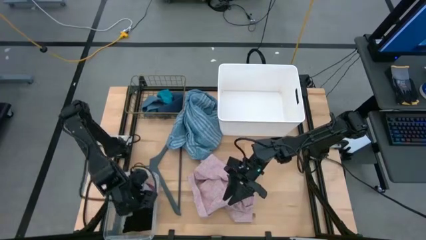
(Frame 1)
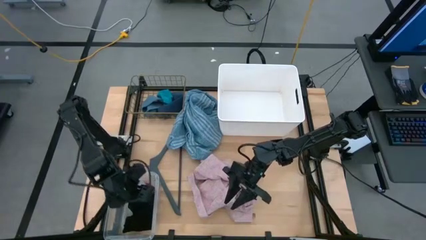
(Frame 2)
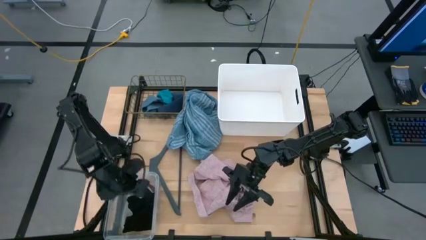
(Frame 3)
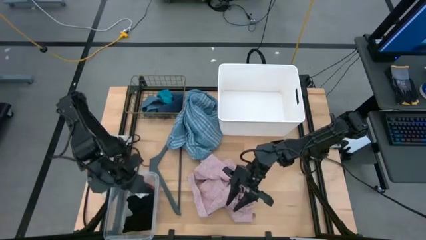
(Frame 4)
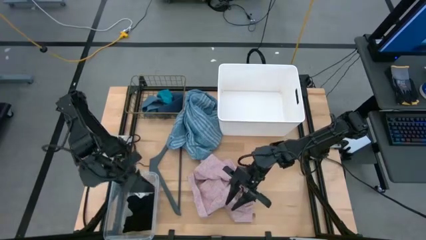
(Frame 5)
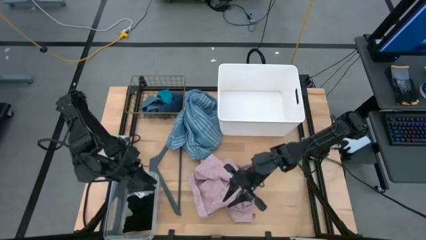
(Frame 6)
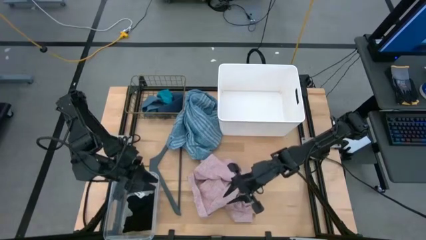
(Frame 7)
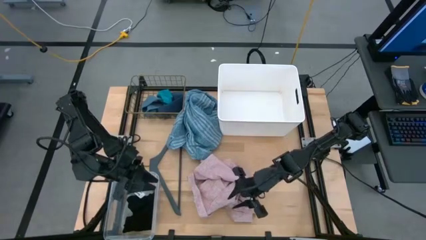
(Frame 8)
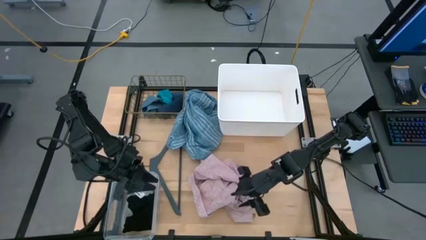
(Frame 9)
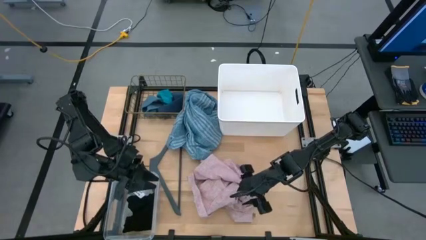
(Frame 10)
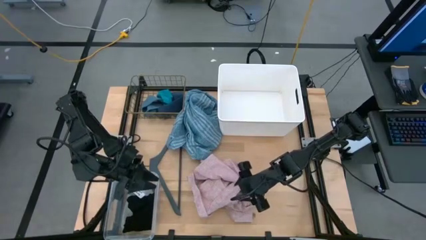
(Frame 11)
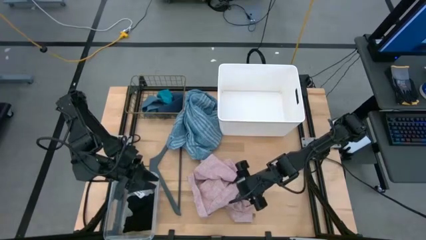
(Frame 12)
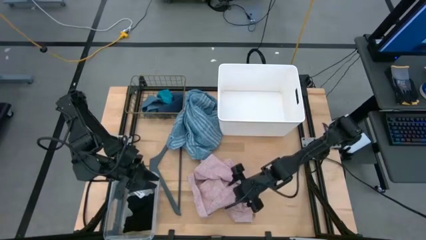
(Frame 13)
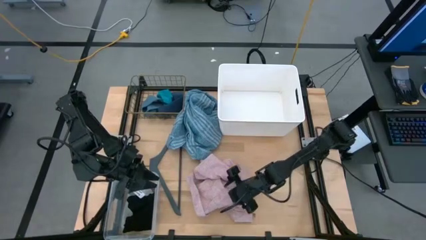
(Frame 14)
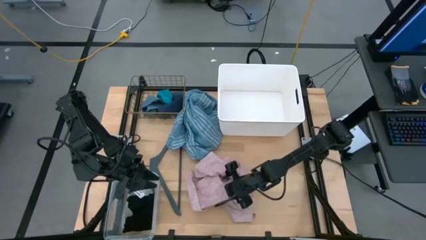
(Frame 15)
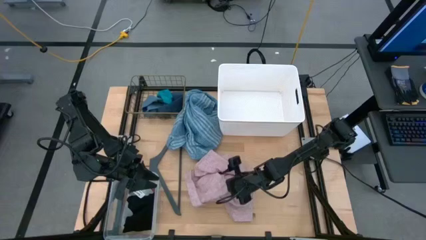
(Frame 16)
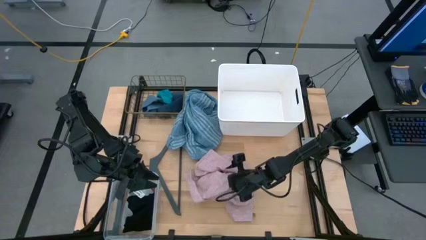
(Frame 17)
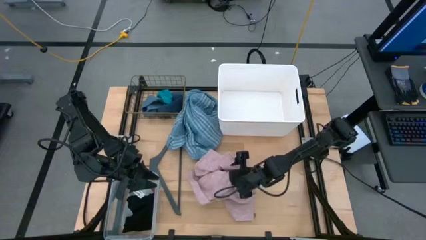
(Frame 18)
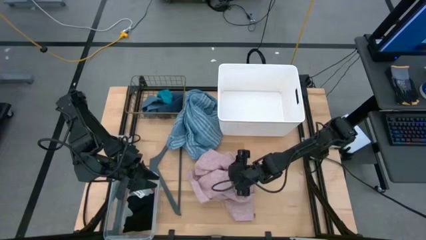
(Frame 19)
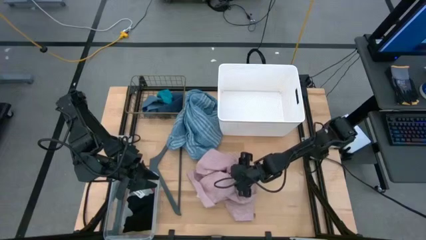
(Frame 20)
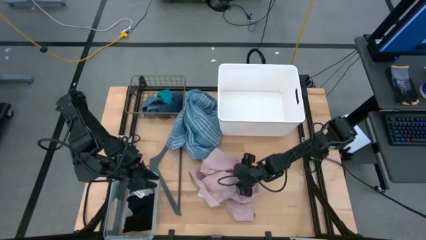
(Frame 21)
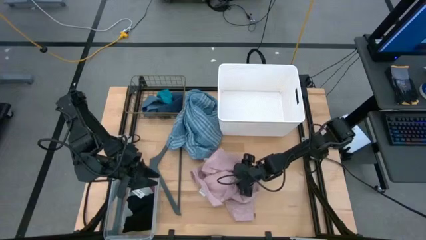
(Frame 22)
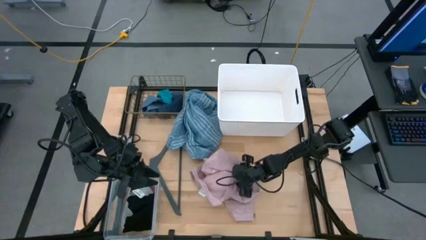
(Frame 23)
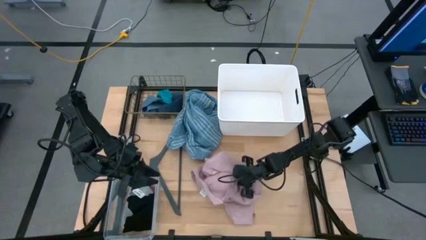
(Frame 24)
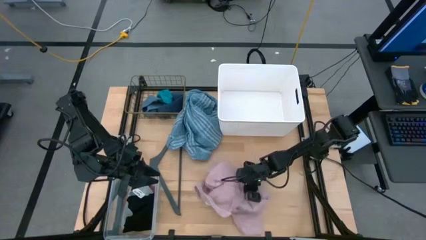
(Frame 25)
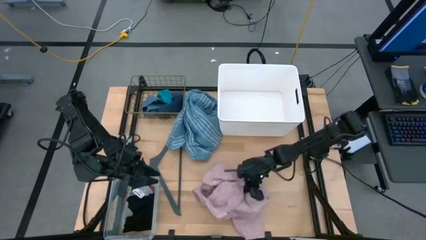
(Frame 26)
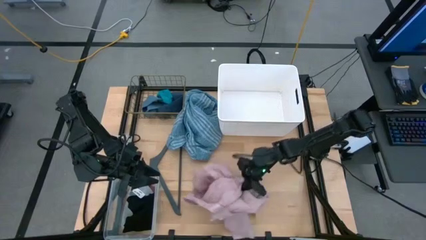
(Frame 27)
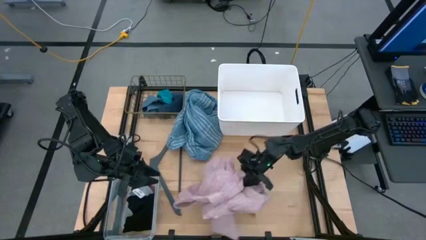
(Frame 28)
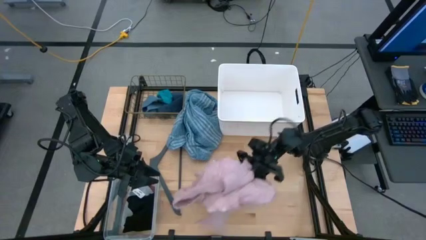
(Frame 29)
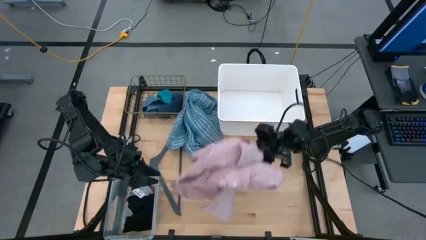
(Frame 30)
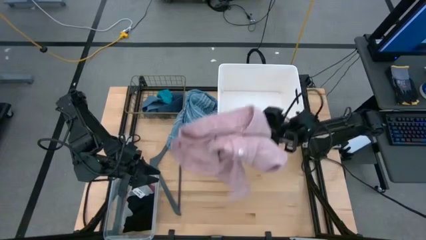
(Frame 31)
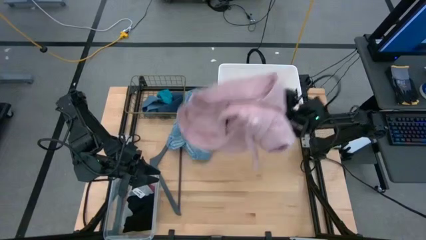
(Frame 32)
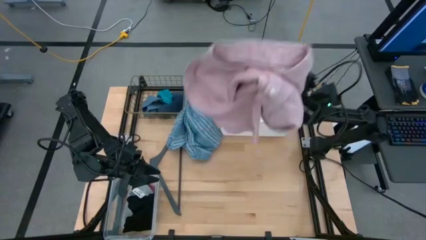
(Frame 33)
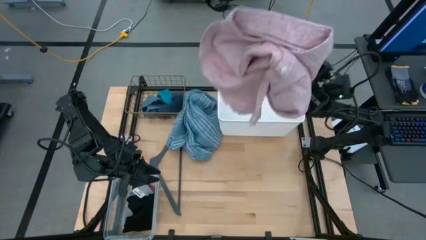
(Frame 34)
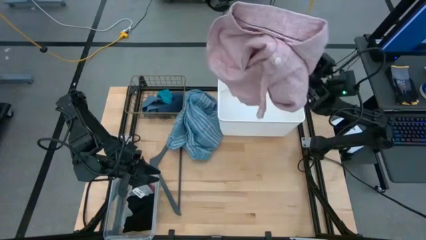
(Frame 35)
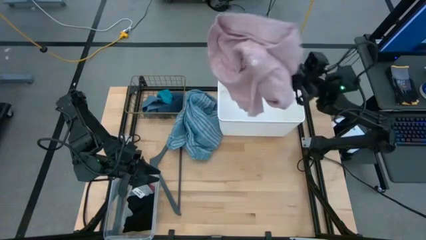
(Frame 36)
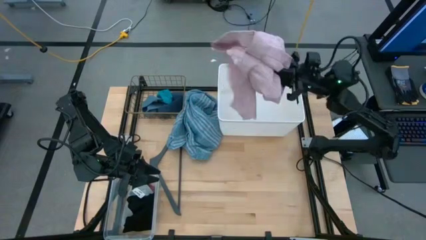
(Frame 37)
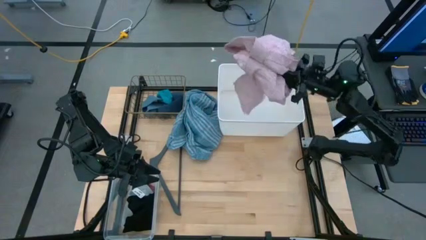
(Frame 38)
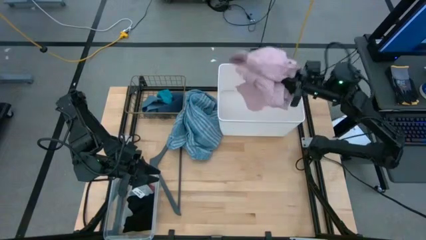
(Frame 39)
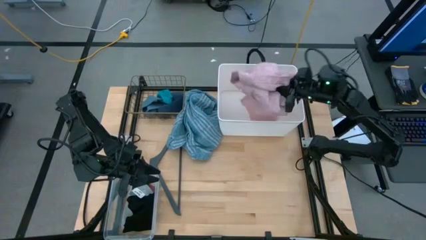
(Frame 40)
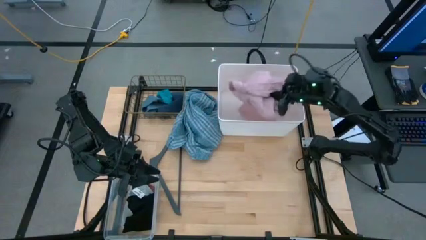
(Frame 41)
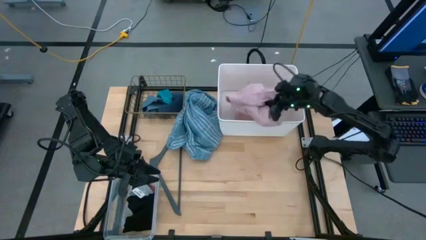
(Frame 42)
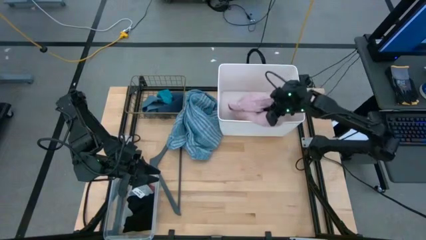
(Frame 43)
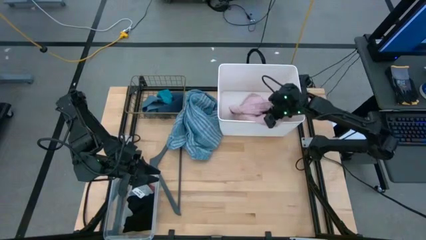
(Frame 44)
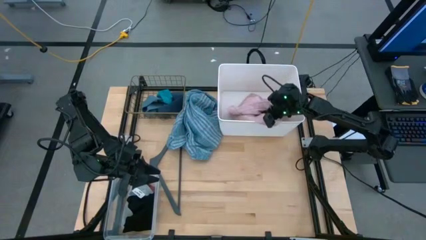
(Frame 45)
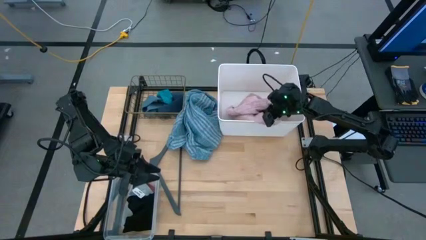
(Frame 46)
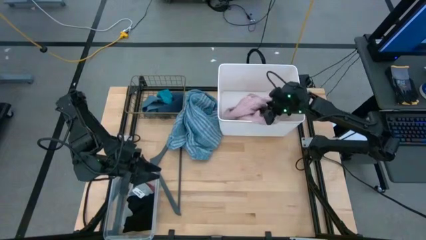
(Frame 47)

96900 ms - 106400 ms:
Task: Pick & Place Cloths
Put the light pink shirt into the white laundry bin

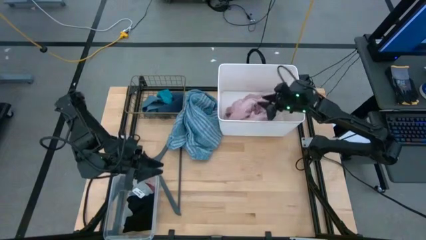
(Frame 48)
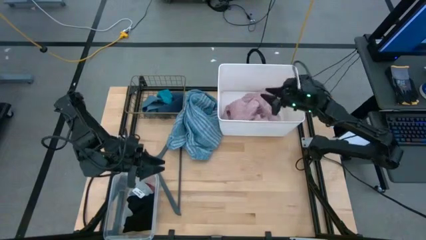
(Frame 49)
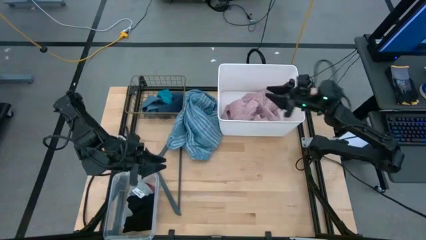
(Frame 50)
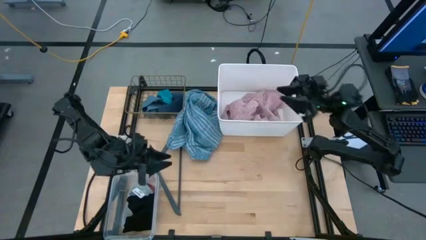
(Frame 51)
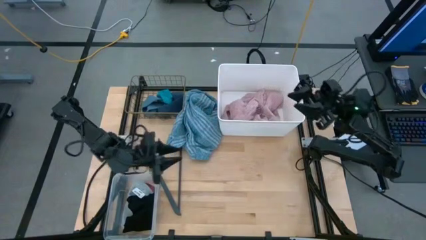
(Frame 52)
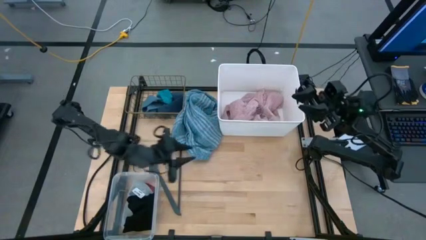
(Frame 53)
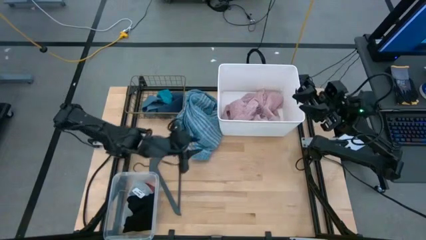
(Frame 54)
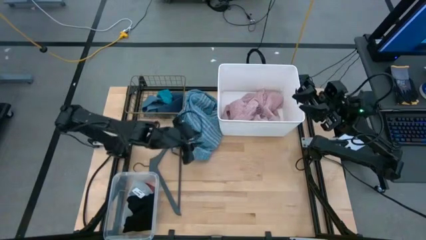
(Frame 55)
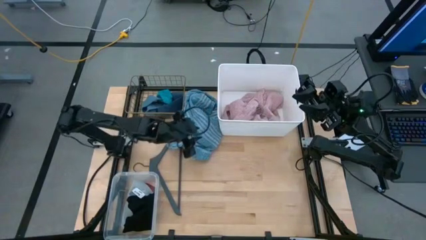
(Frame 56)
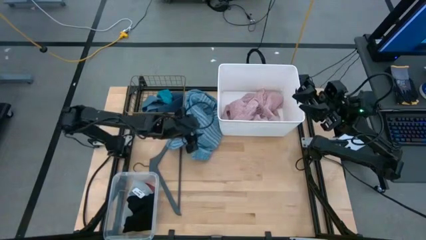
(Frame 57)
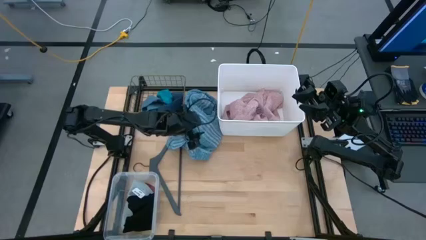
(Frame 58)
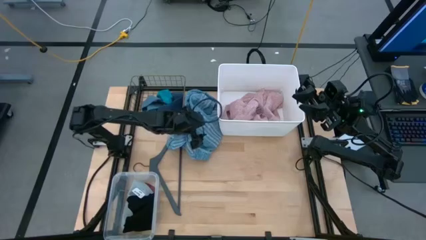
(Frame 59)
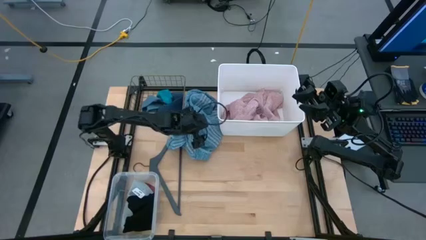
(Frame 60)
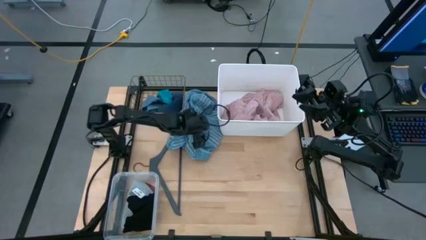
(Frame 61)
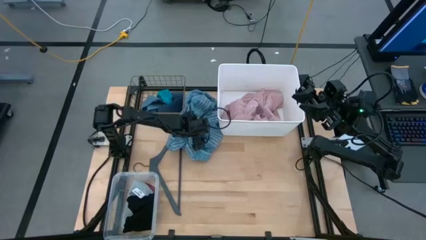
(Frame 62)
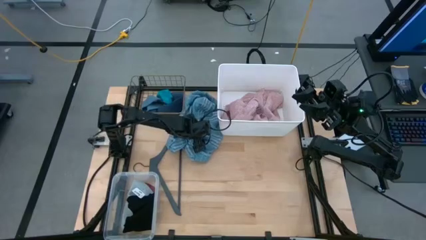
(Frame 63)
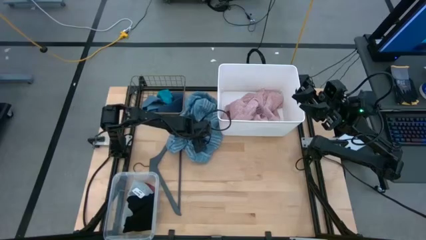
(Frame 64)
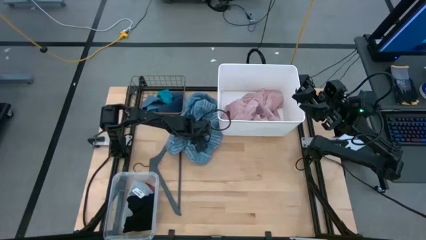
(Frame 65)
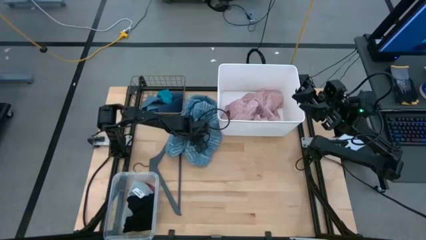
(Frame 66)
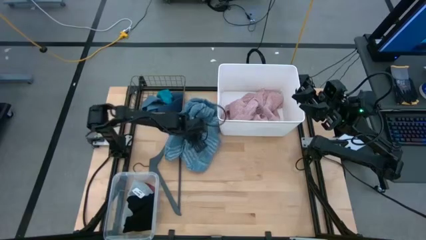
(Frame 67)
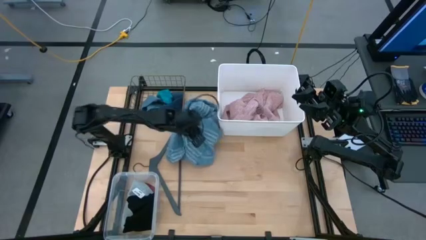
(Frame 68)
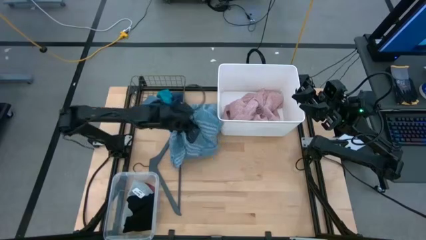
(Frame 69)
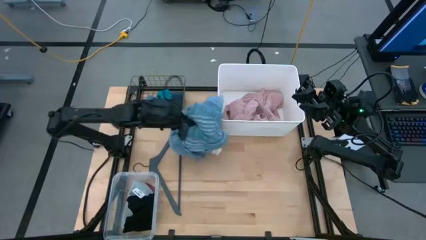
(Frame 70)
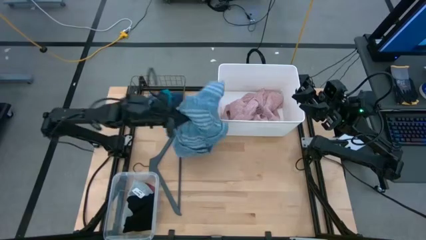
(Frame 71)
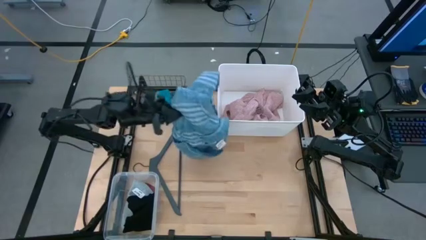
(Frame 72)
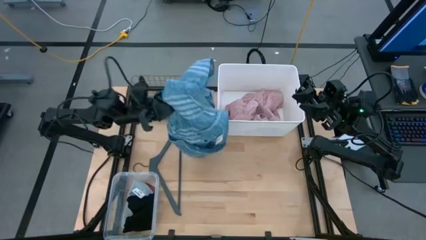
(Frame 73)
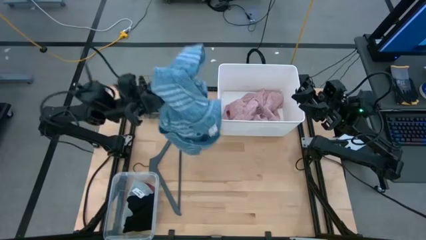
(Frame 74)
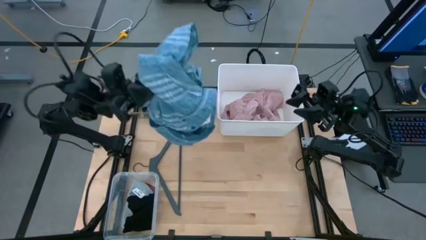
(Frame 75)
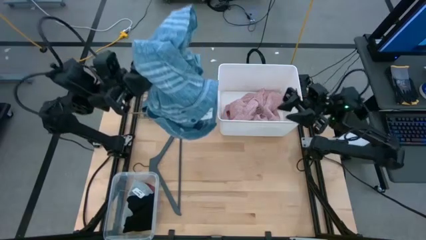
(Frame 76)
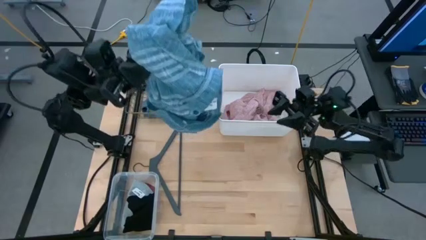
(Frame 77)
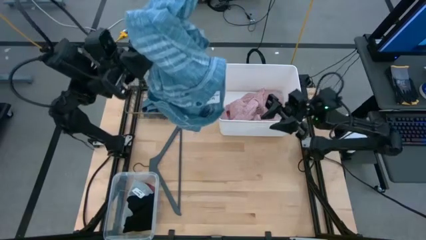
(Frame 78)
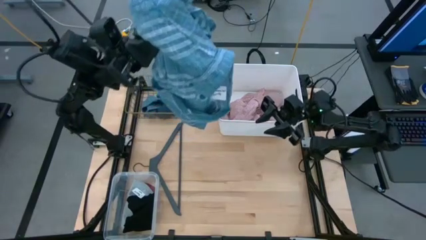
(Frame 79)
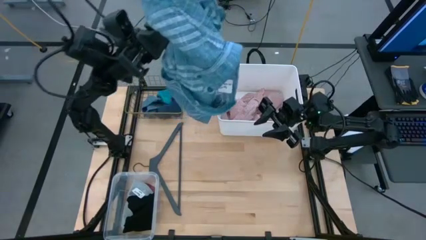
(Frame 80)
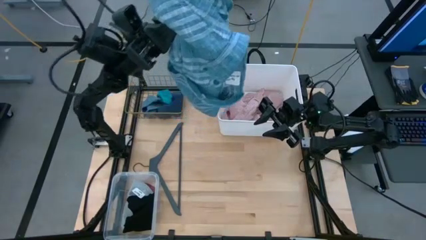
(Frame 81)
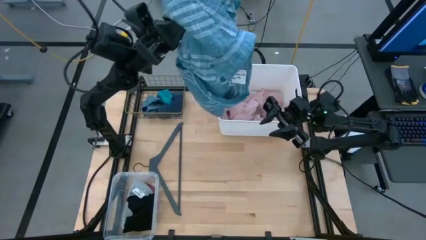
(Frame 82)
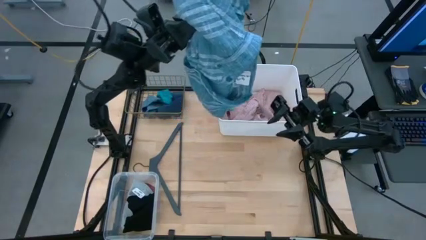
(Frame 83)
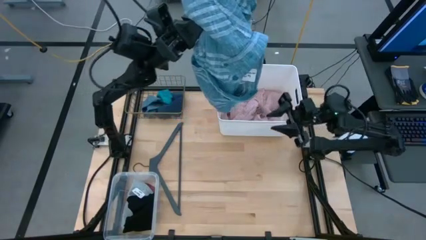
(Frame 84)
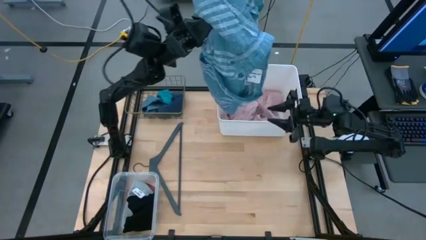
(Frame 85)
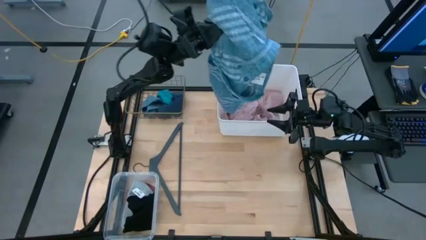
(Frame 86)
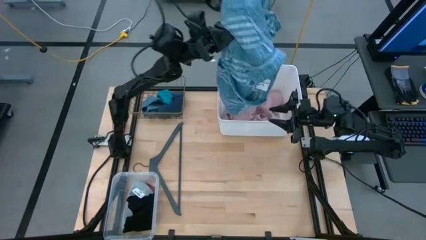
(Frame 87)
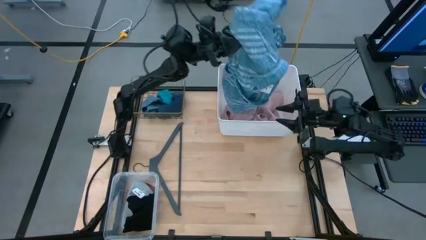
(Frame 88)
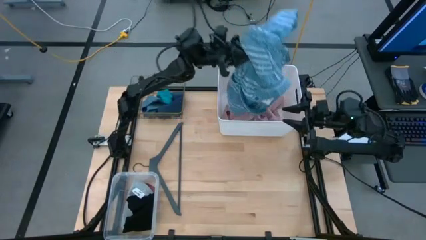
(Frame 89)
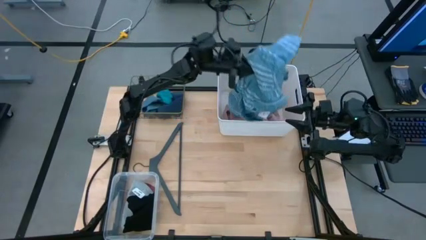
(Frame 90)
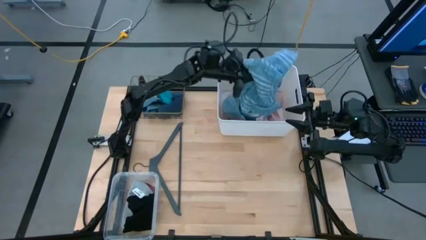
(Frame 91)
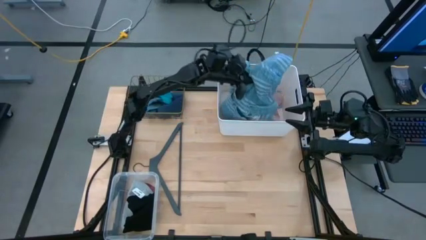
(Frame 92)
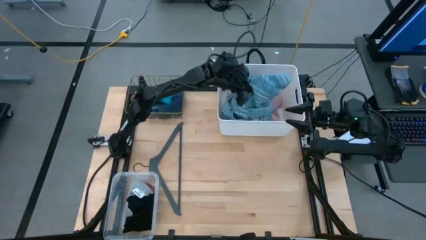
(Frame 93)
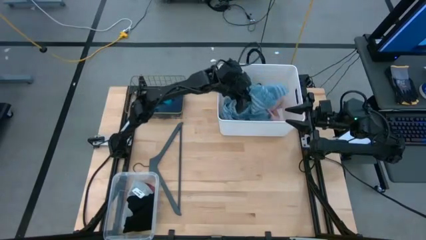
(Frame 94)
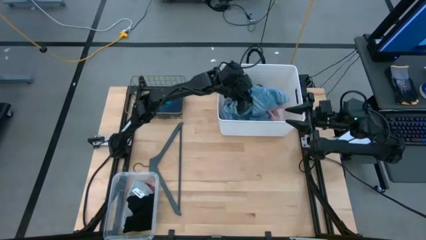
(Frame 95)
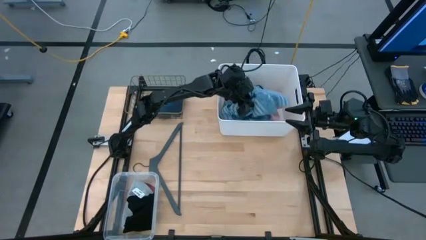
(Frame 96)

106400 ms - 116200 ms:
Put the blue striped shirt into the white laundry bin
